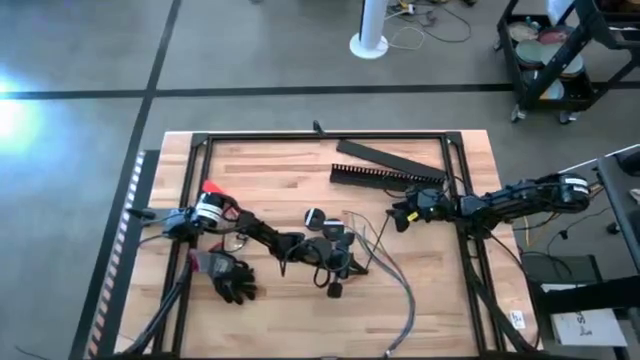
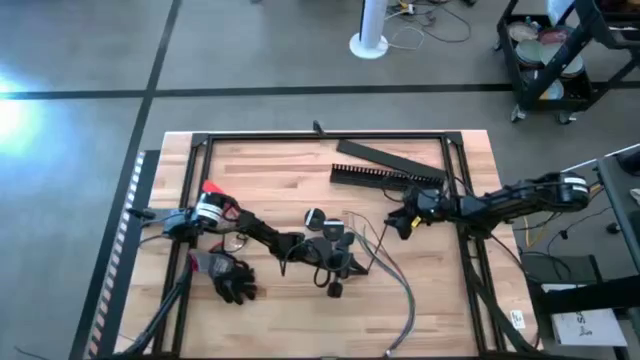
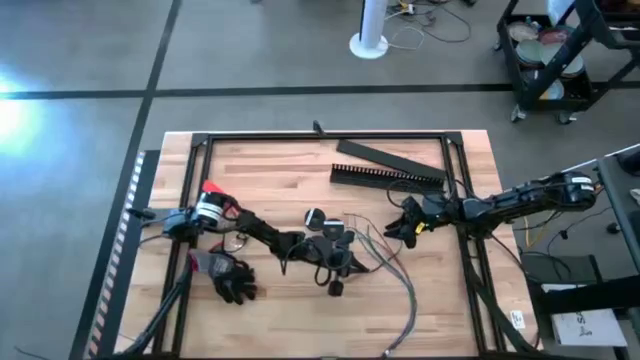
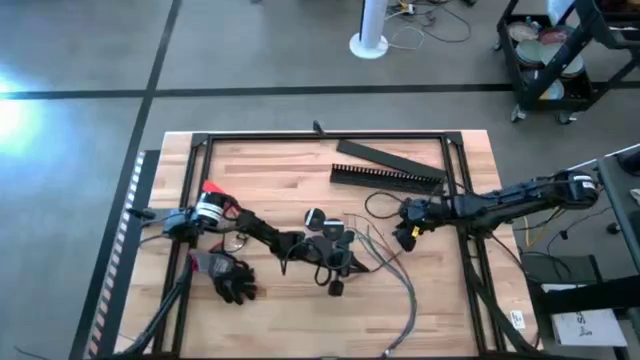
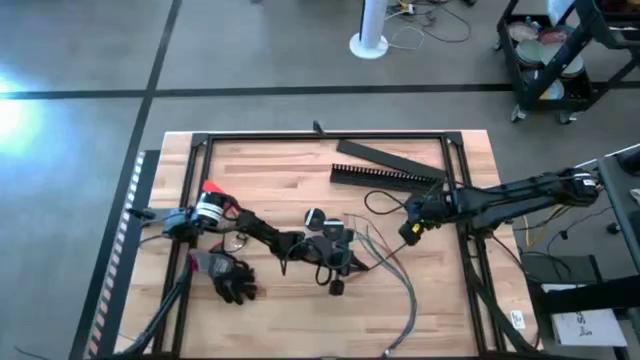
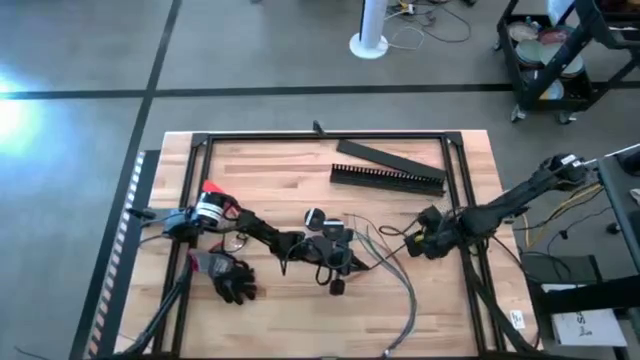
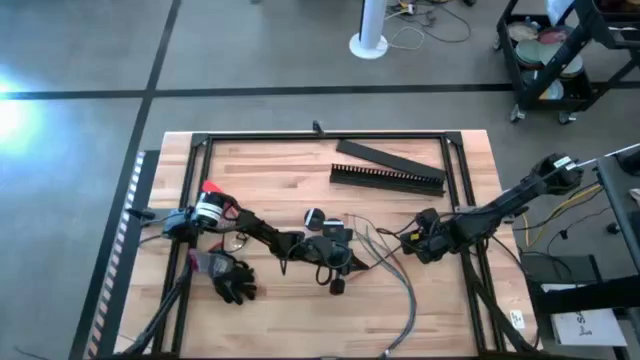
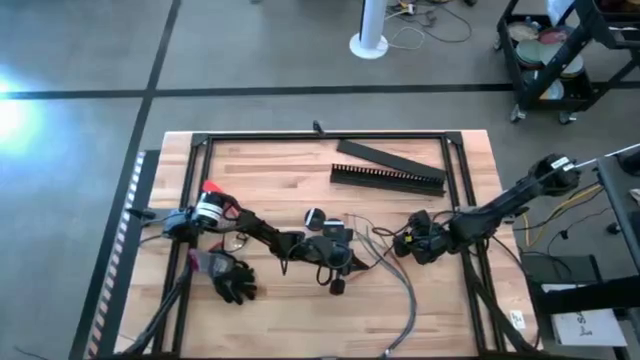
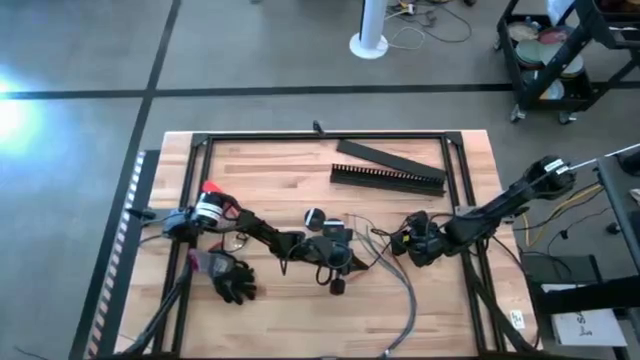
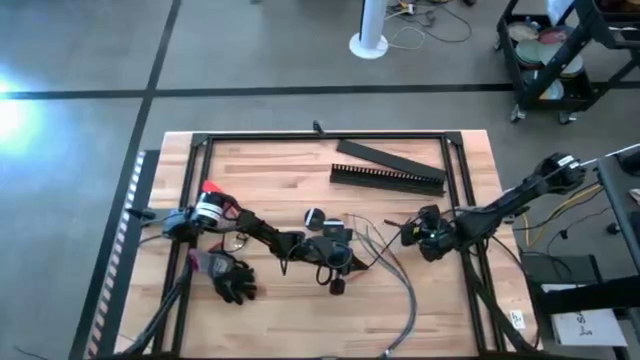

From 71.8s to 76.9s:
Task: Ziptie cables
Wrap the black zip tie on the cables

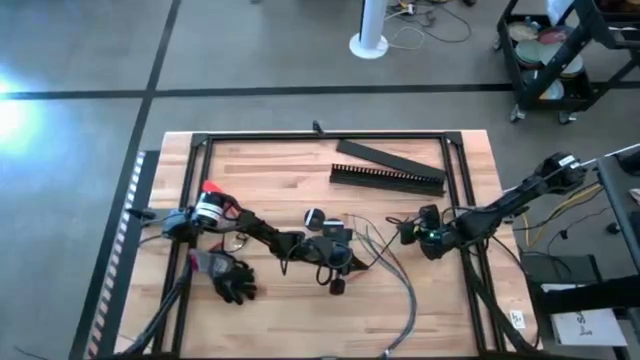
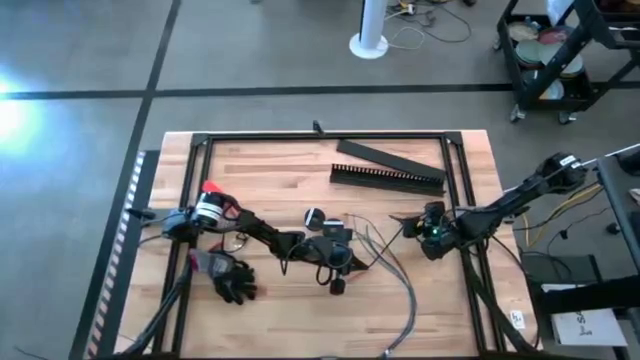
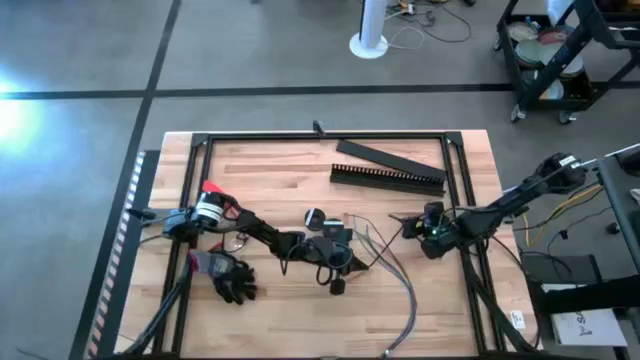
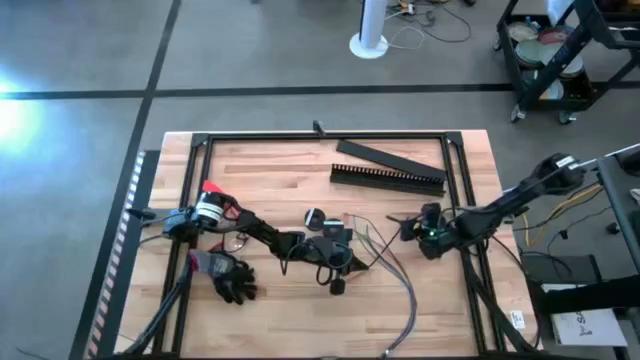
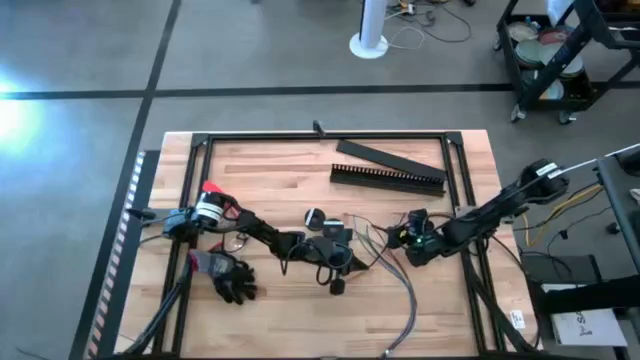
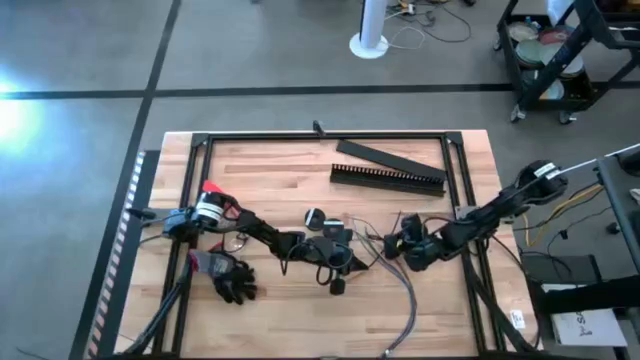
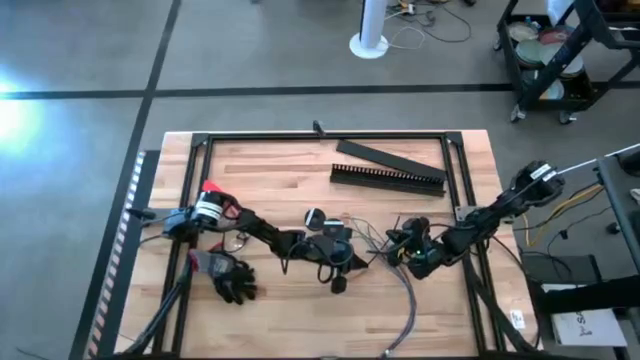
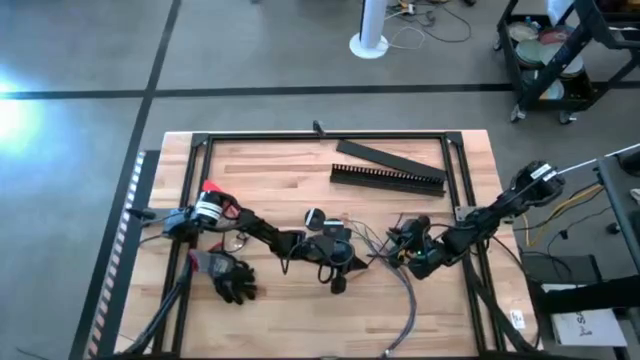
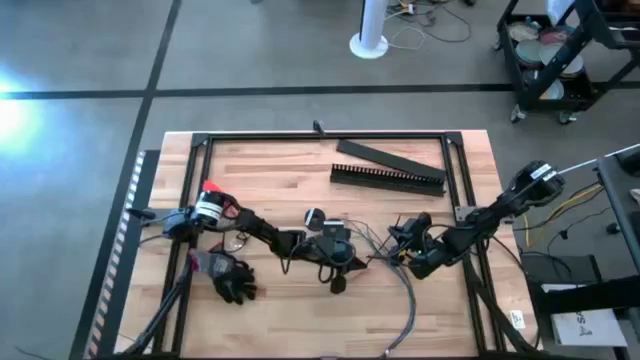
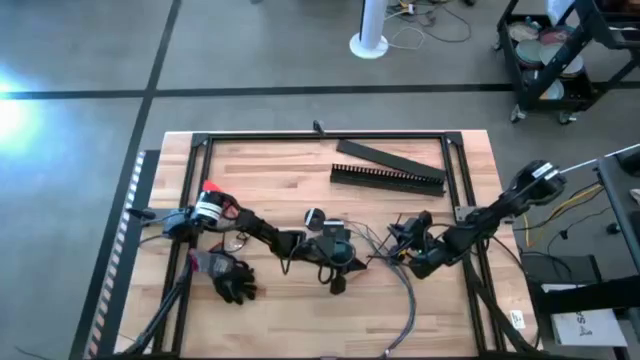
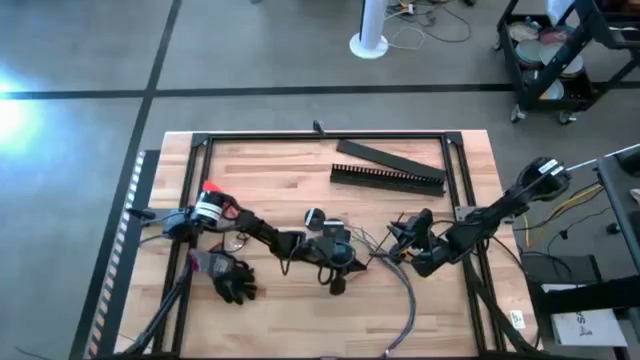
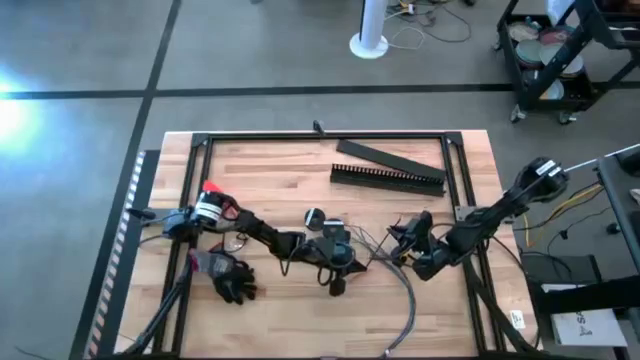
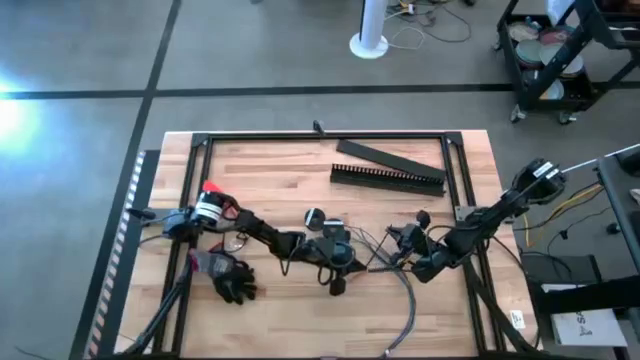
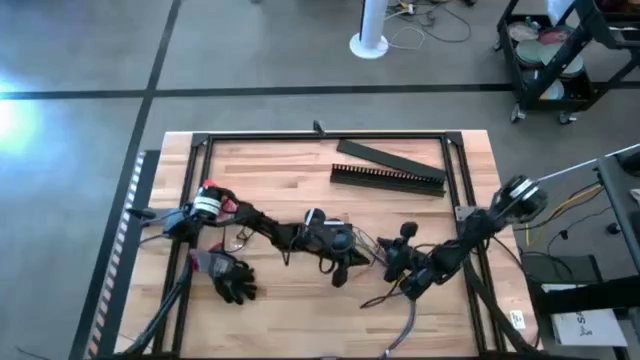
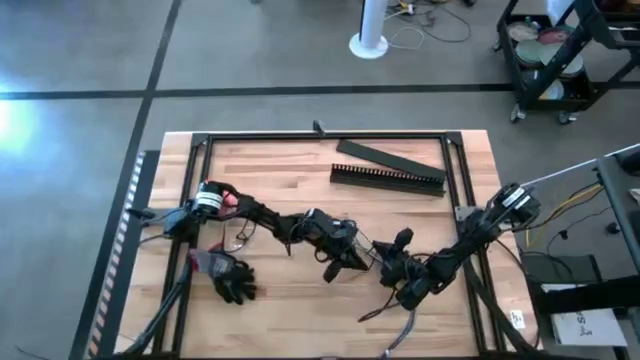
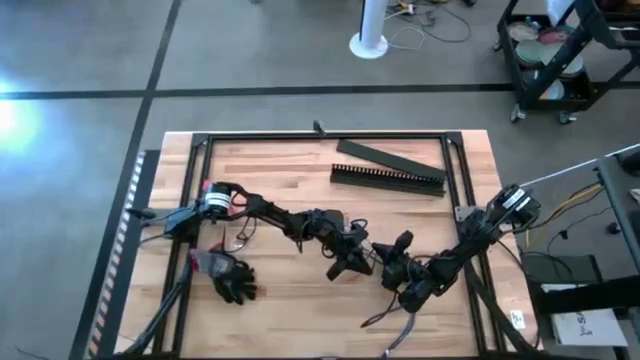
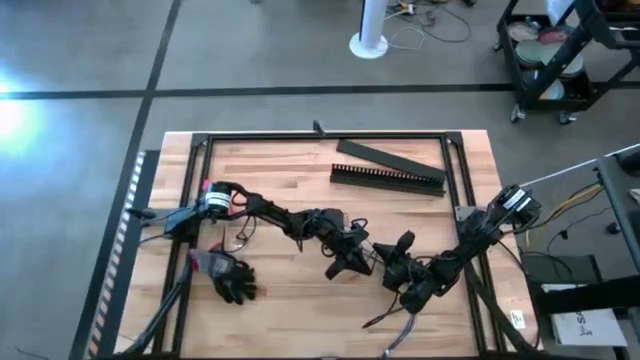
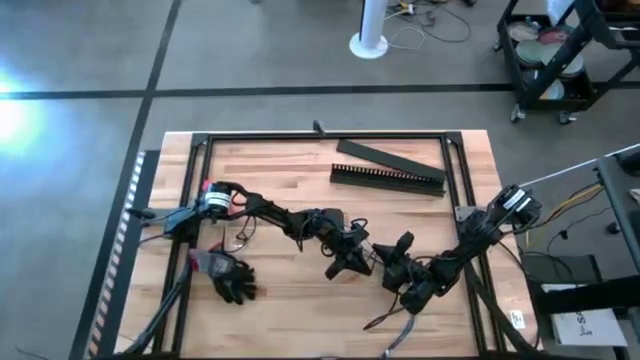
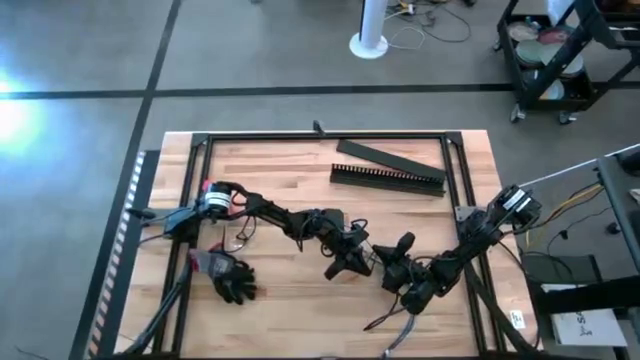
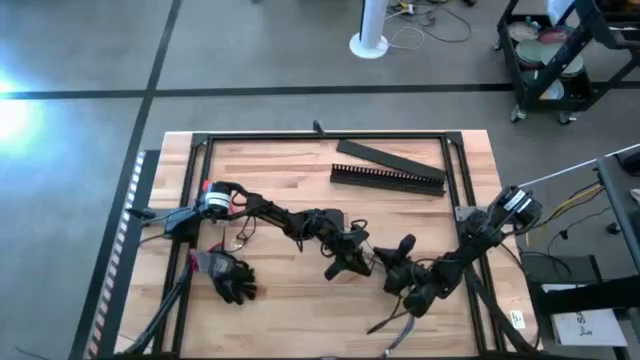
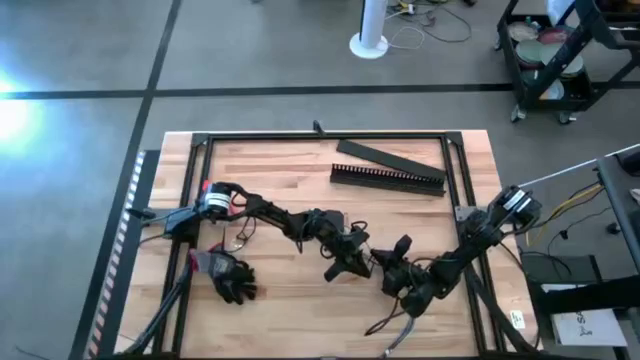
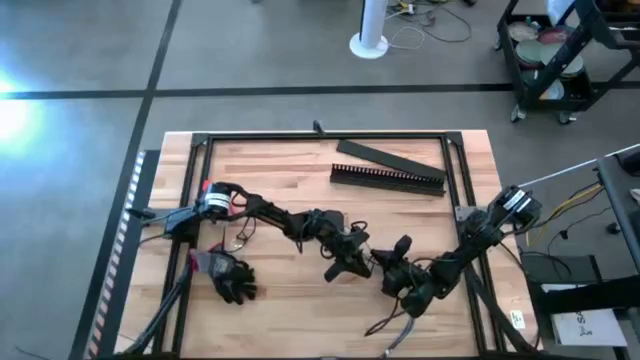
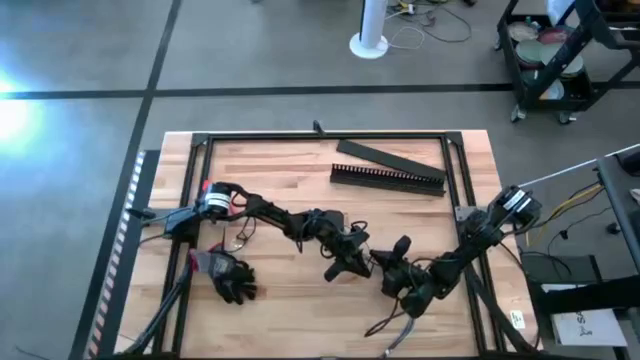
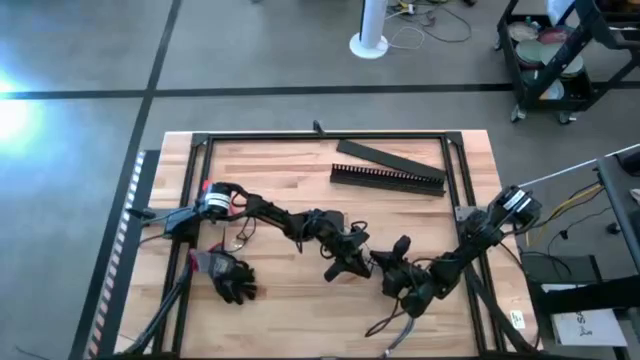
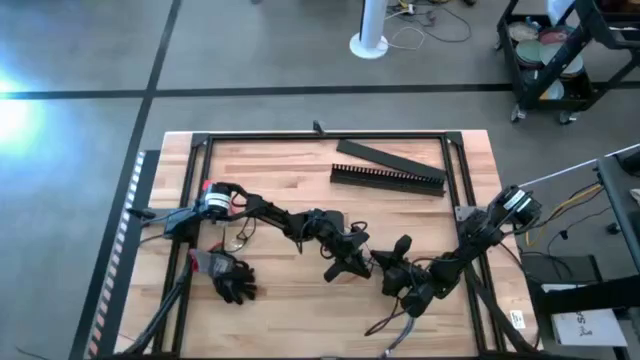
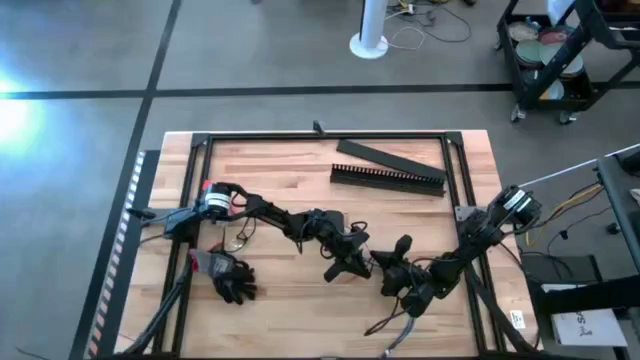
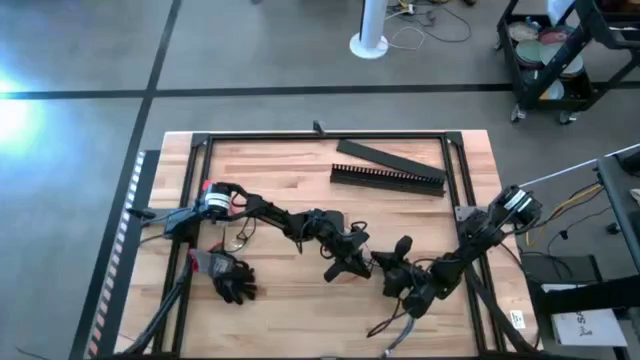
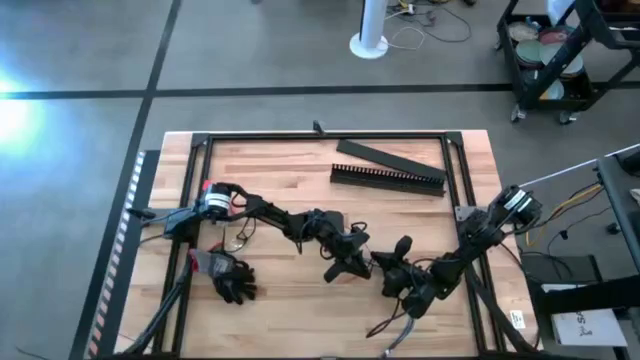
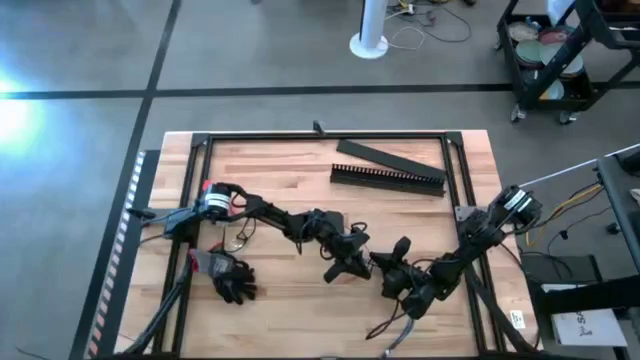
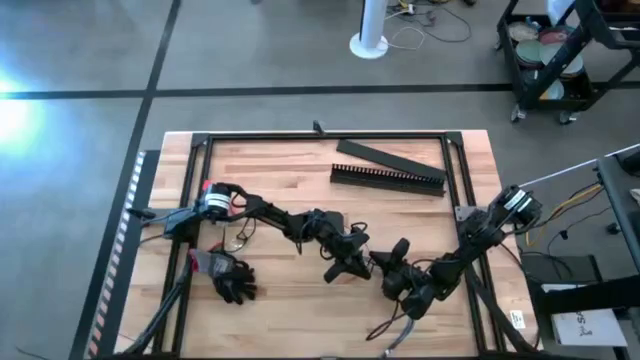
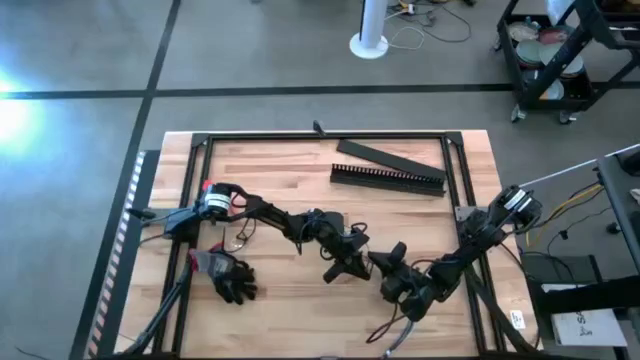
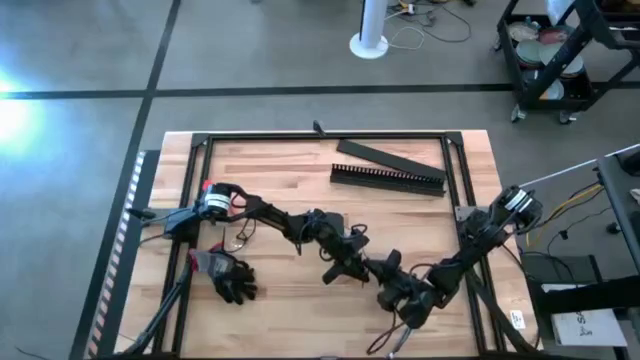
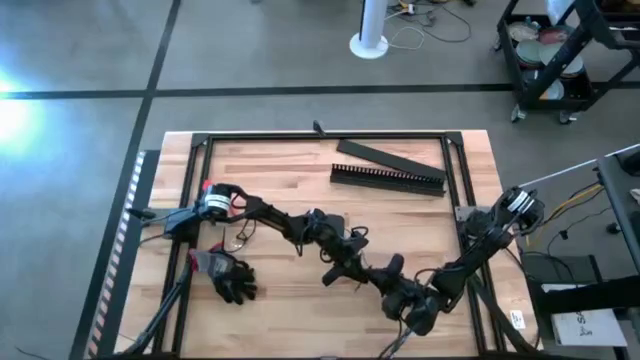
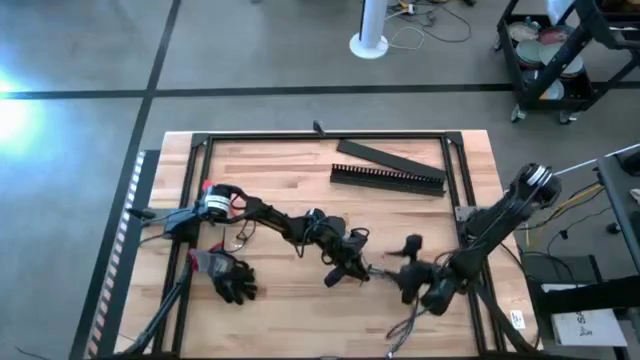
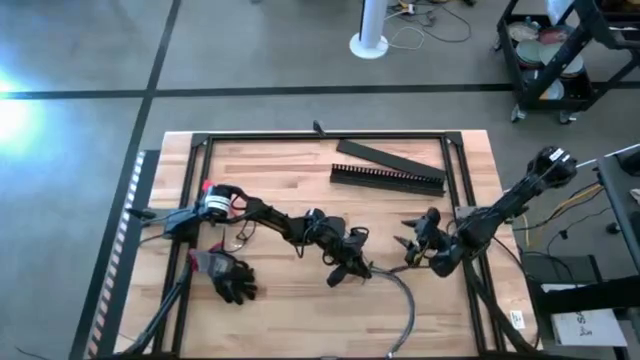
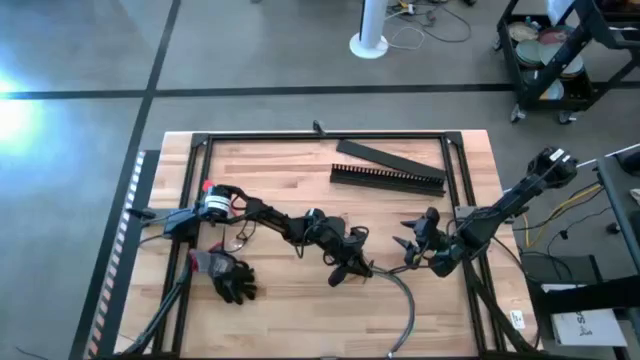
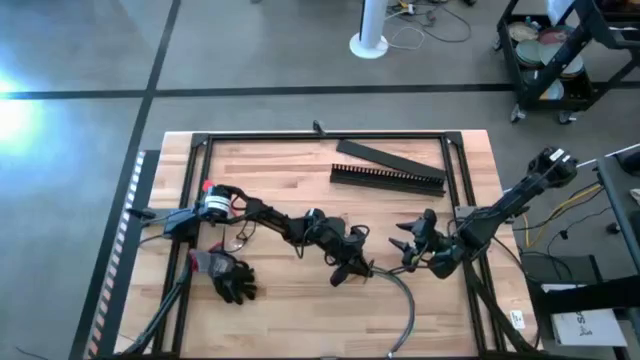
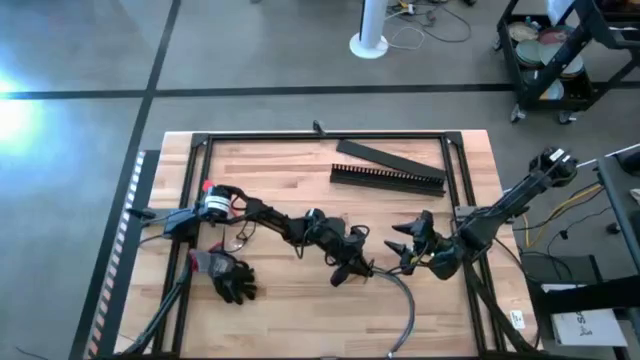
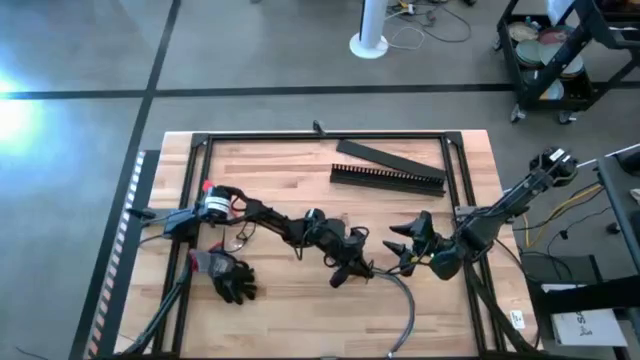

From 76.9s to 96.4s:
Wrap the black zip tie on the cables
